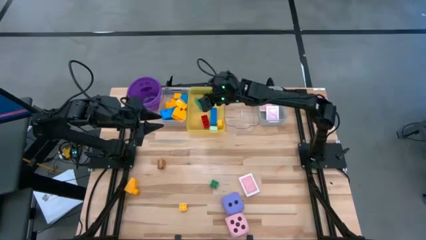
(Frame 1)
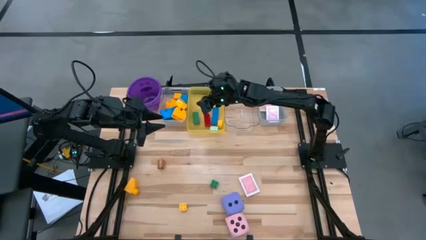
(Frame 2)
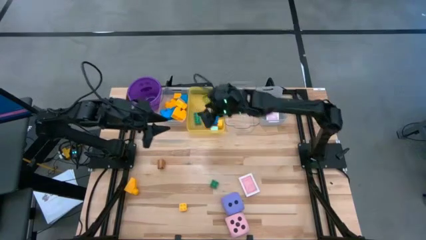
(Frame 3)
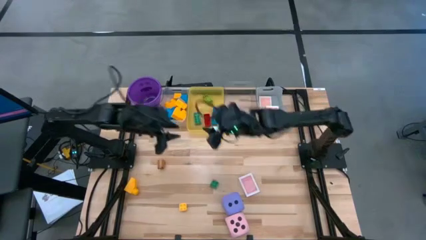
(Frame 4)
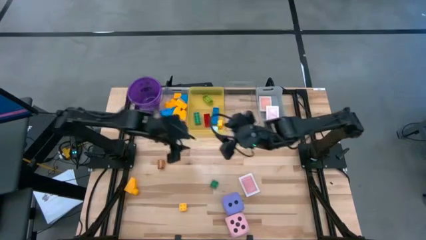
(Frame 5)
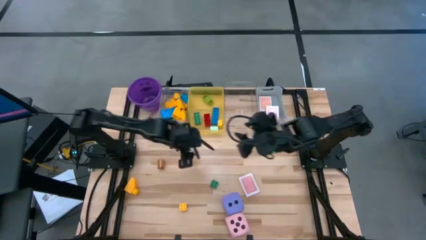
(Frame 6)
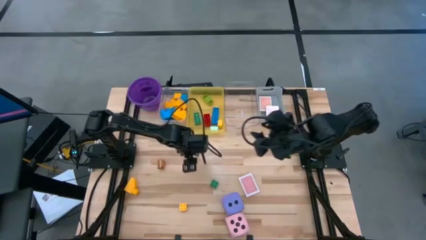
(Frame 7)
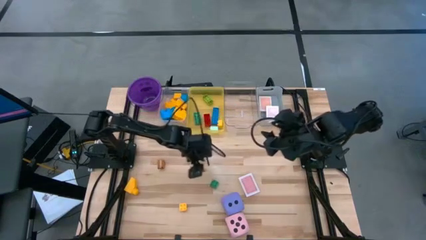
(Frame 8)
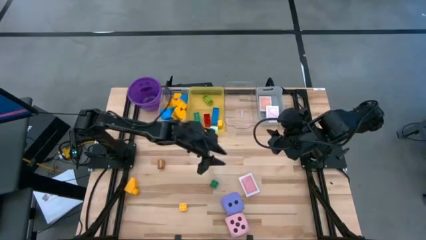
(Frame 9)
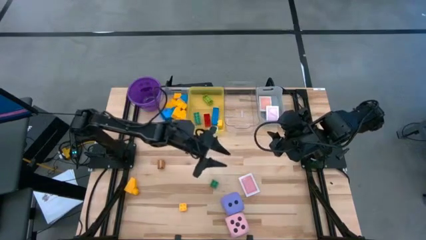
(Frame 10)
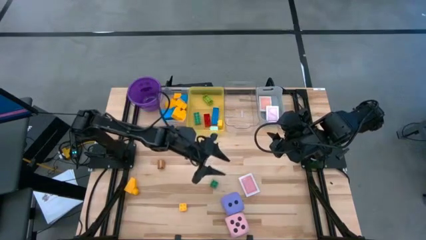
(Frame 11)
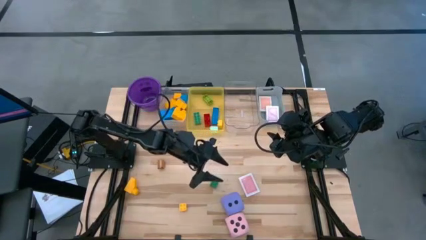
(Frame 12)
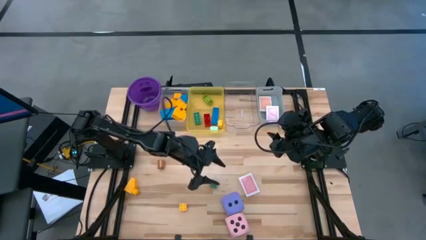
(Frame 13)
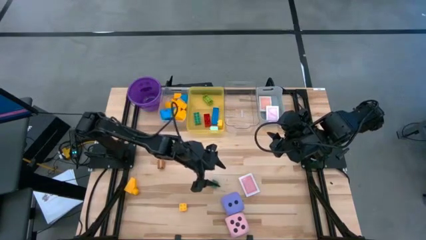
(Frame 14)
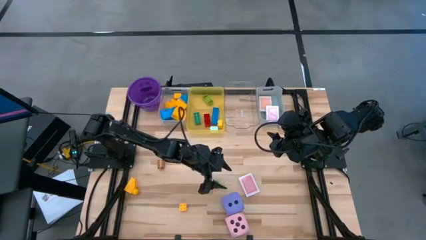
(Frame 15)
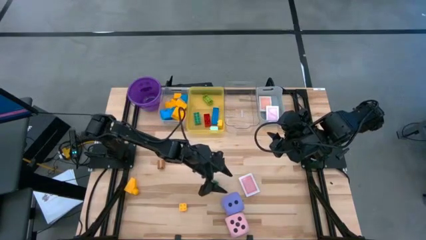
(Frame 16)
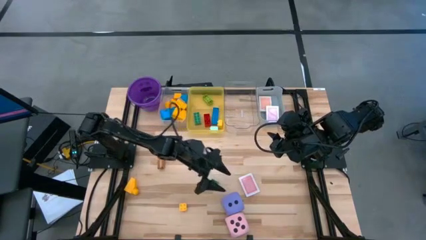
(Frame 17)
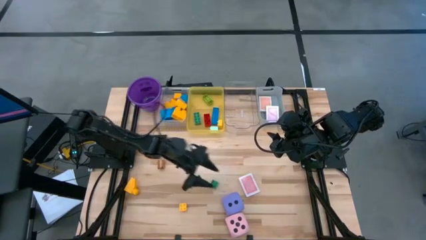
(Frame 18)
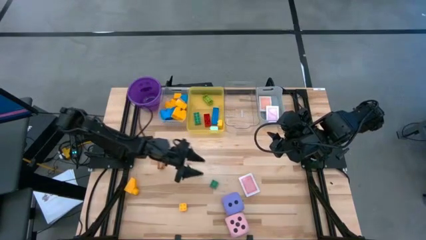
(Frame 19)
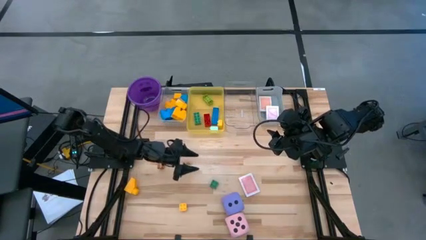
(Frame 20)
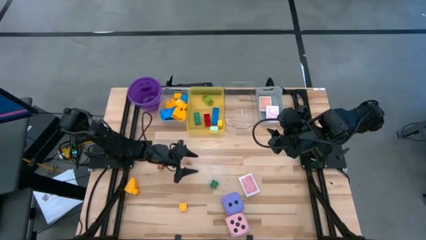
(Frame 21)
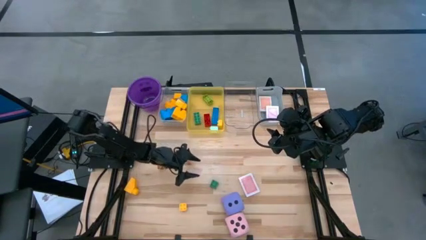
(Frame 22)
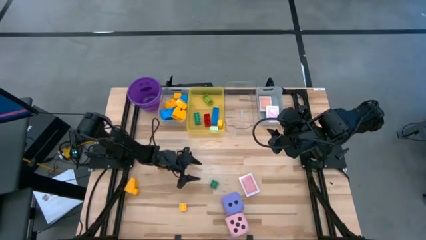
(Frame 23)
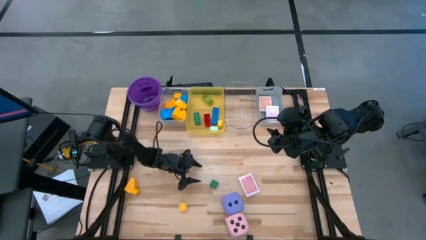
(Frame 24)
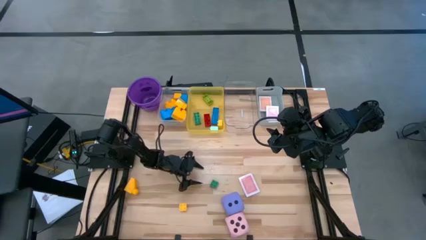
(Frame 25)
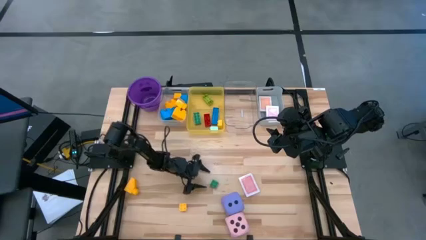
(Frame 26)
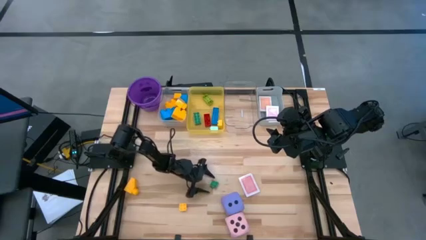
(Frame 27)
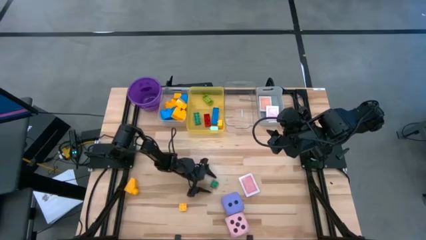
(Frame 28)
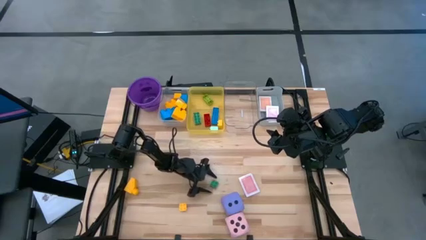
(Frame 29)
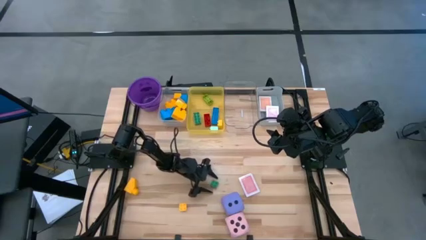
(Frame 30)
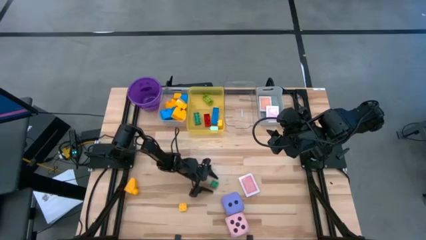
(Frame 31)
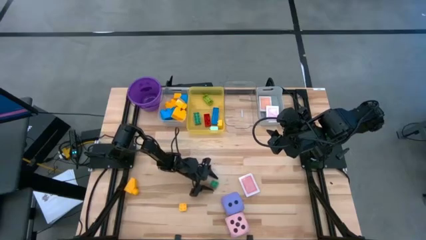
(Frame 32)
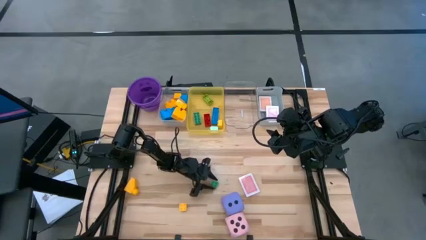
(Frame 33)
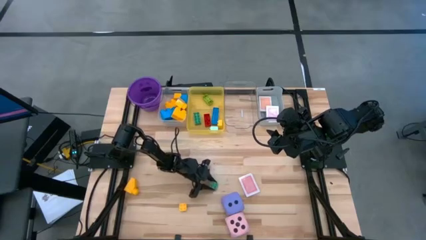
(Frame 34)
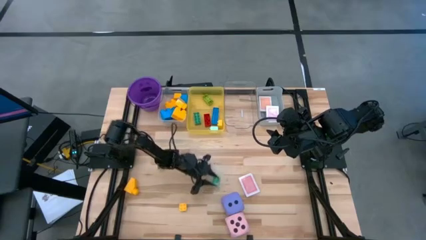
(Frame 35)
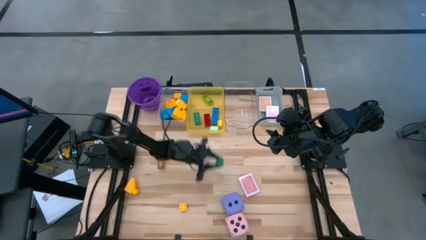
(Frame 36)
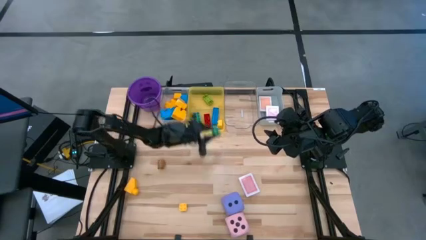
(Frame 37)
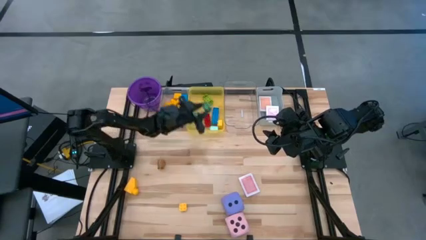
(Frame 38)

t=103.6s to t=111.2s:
Task: Pick & Place Toys
Put the small green game piece into the yellow bin

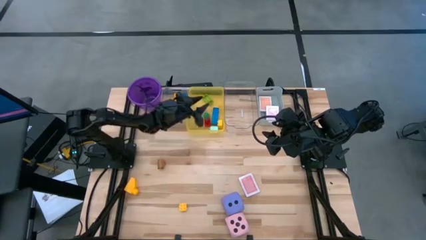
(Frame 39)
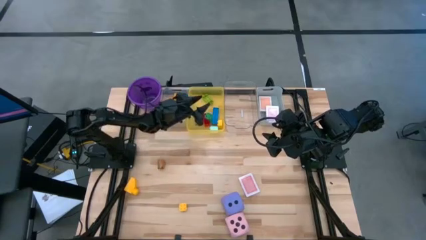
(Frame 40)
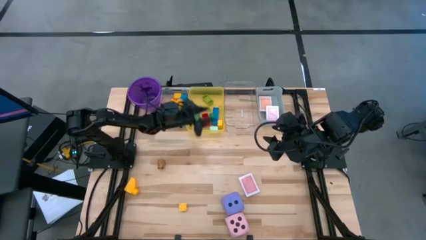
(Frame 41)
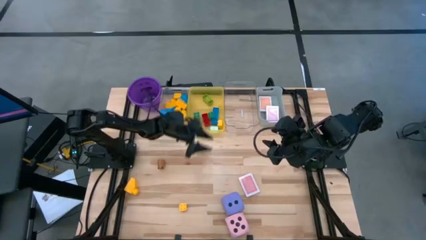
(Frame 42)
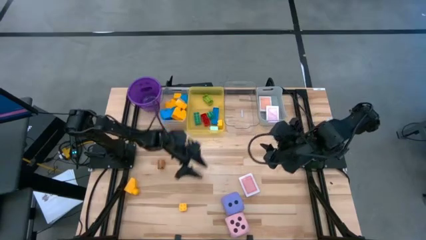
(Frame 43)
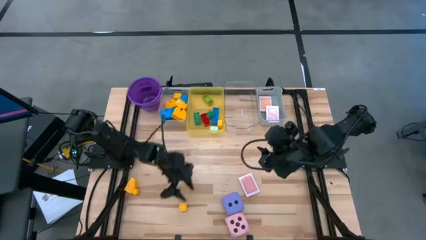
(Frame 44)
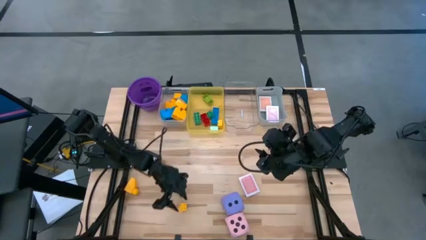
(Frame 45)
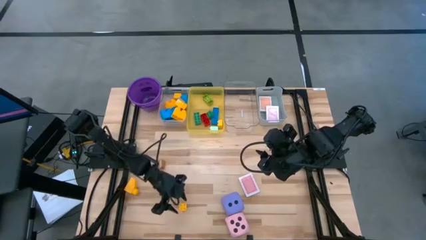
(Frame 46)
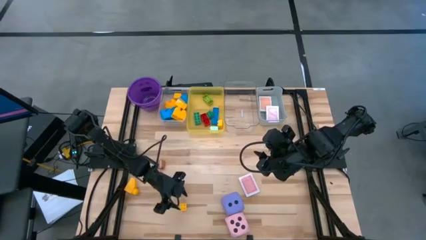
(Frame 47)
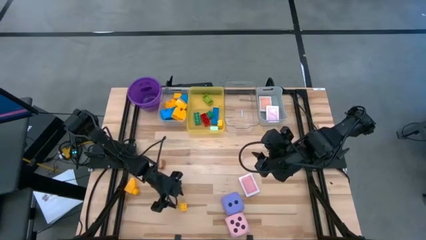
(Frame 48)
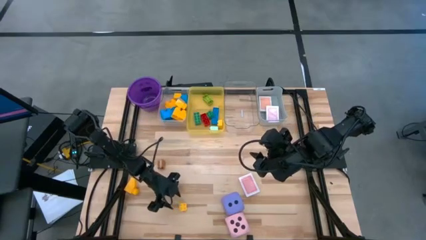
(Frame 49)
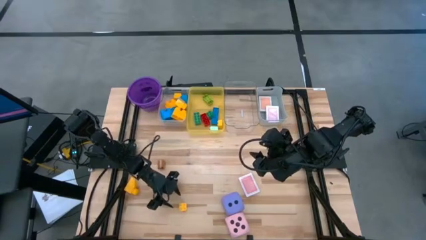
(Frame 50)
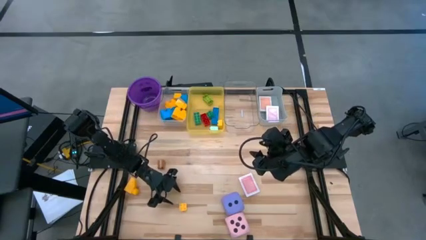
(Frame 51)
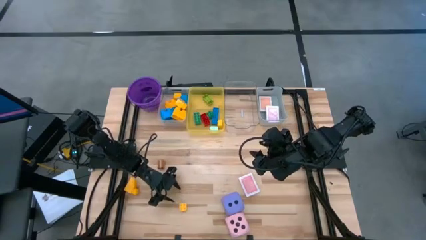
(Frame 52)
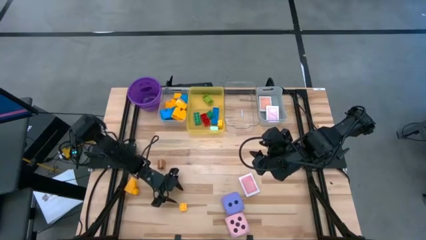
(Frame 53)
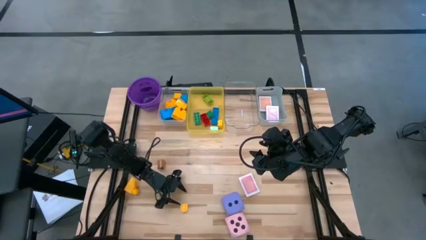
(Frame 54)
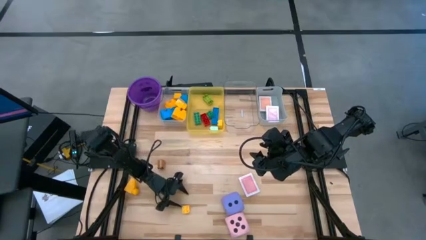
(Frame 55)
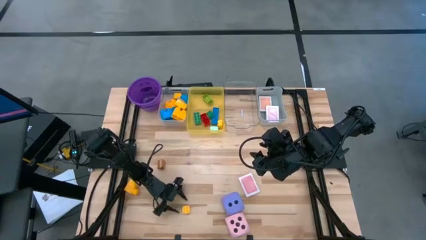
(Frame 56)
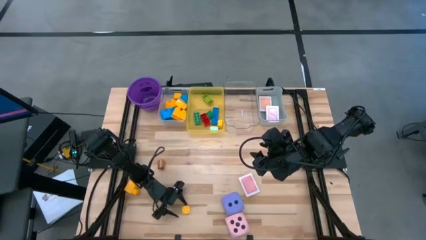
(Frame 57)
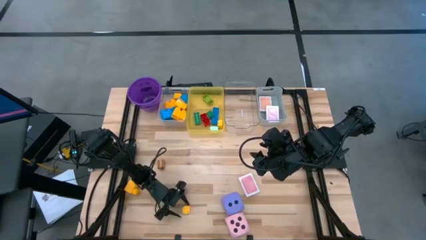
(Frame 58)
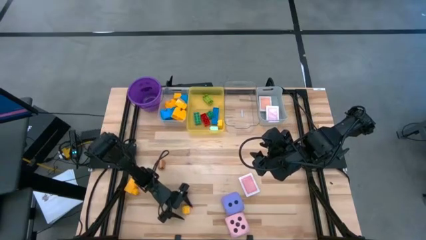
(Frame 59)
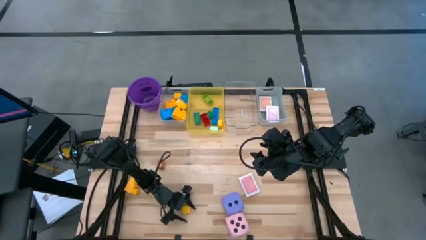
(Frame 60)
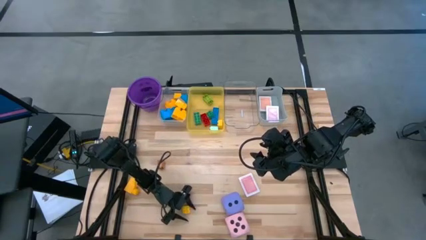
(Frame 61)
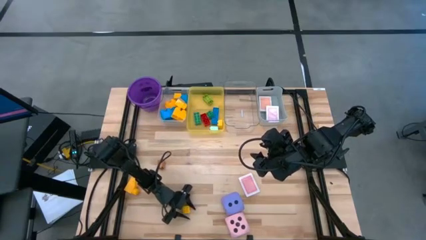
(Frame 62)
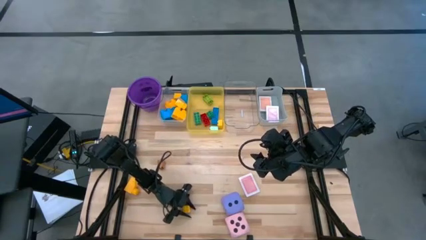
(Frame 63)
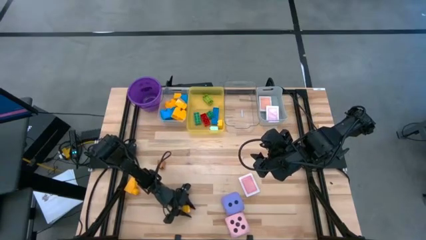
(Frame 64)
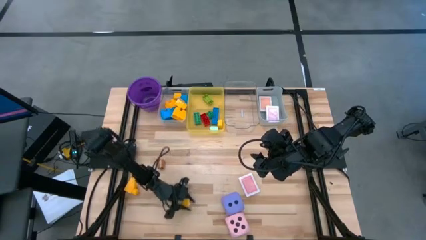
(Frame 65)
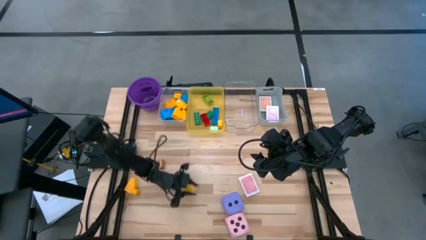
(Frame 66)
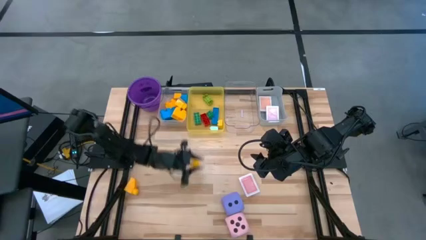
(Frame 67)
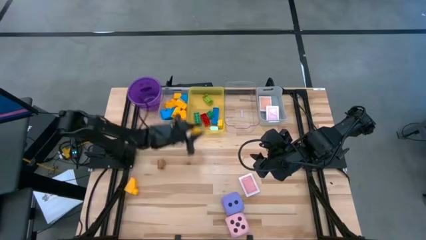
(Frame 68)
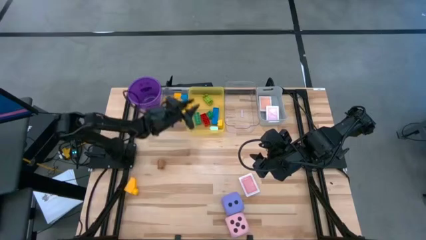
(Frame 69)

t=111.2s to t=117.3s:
Put the small yellow game piece into the yellow bin

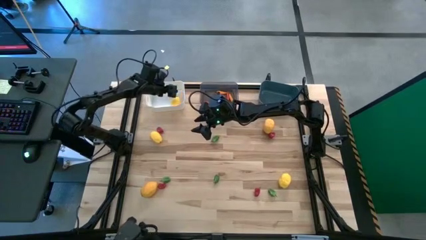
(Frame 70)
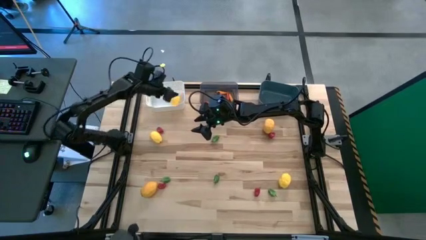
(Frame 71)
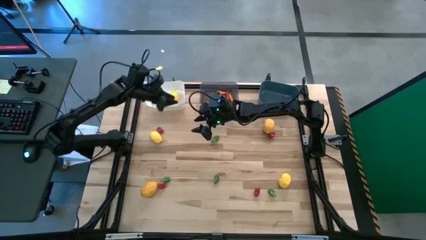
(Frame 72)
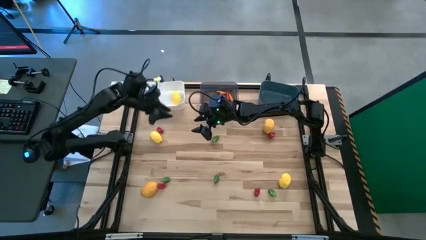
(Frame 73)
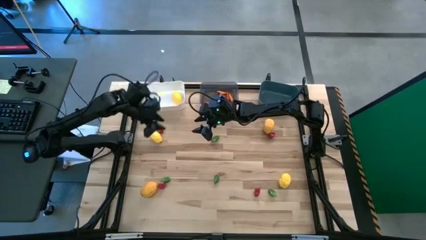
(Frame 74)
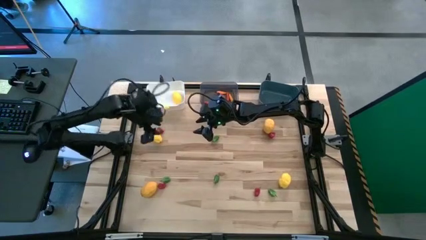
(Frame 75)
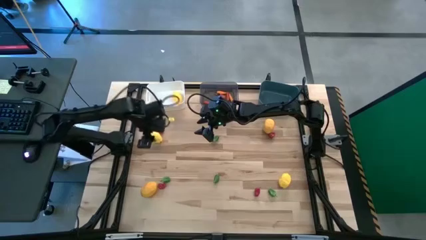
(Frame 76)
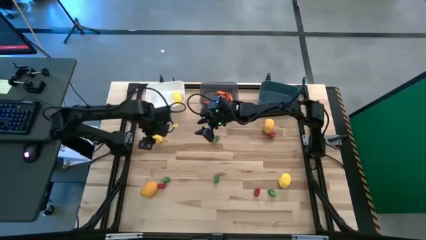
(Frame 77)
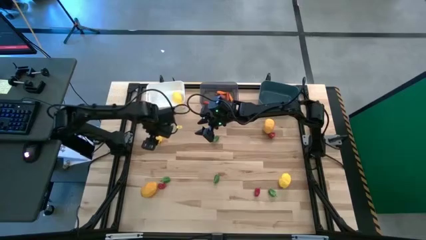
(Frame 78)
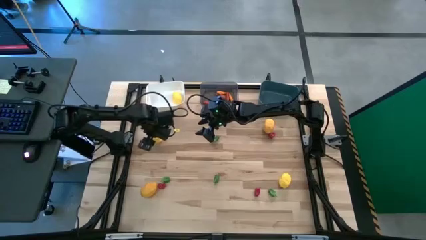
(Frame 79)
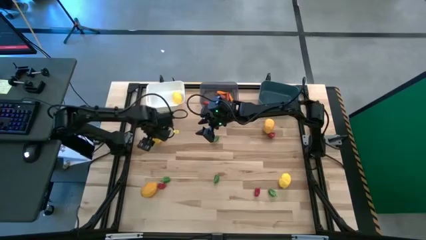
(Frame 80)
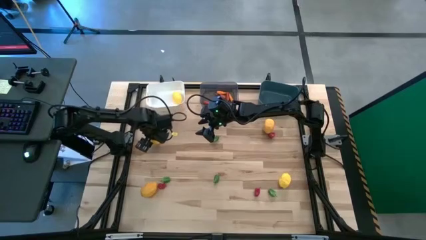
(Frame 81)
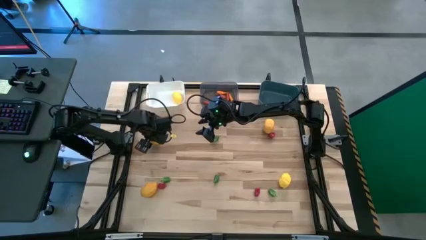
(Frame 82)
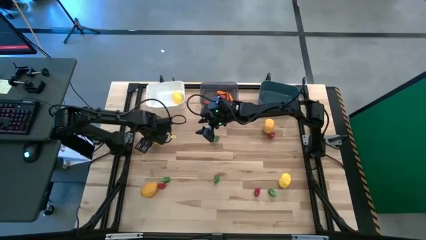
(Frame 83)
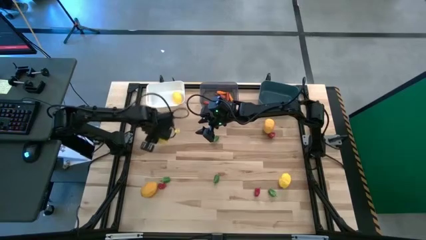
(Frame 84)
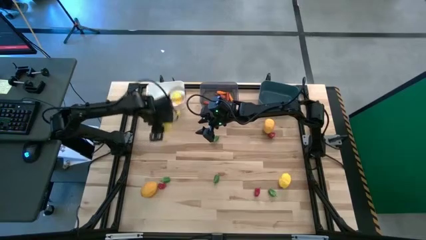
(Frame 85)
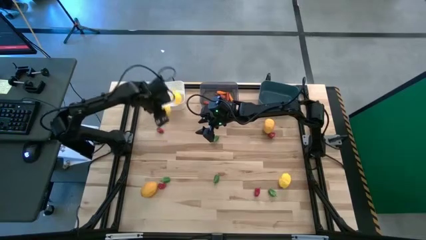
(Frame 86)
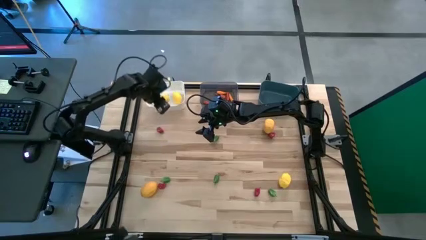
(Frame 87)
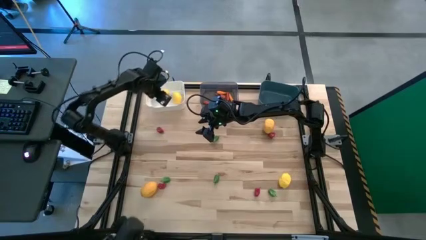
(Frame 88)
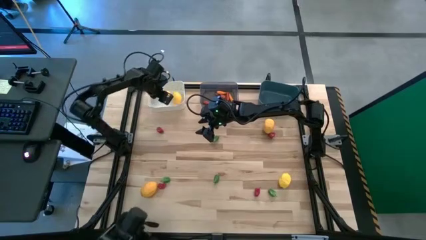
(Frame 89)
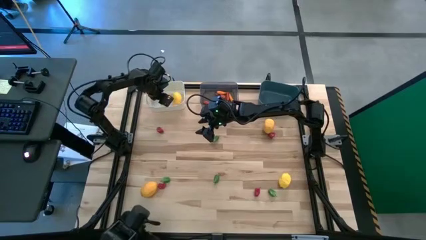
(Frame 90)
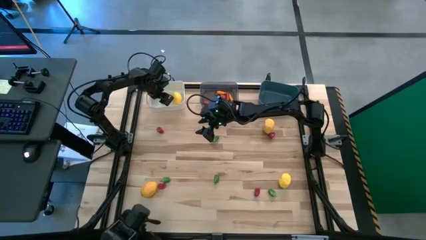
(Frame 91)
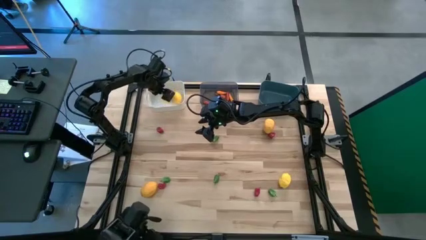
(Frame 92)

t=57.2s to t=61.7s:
Task: Sort produce into baskets
Put the top left yellow lemon into the white bin
